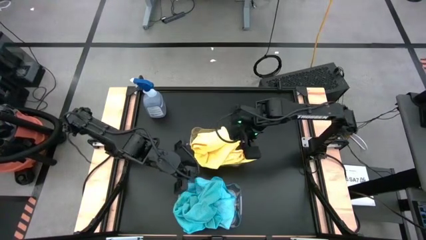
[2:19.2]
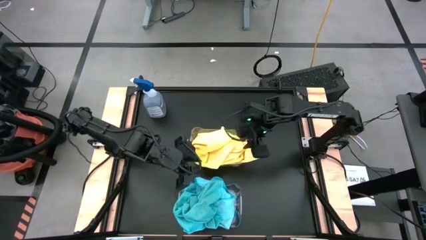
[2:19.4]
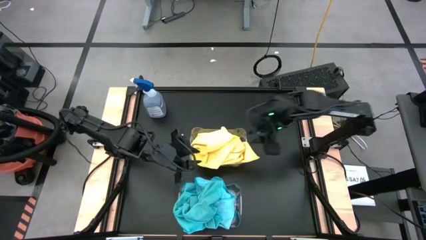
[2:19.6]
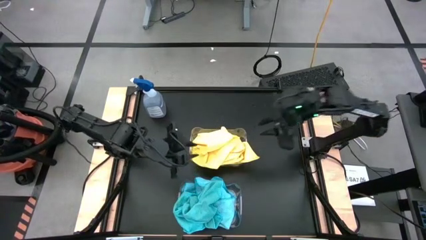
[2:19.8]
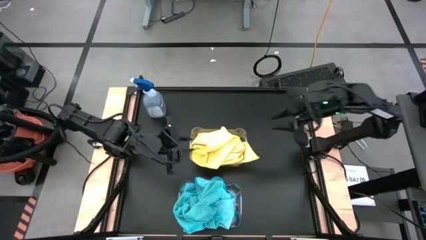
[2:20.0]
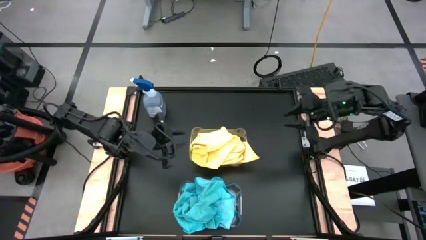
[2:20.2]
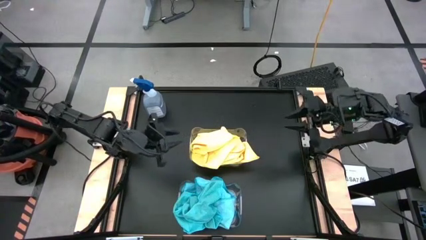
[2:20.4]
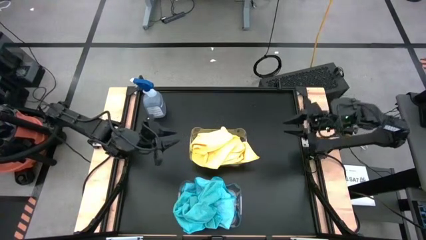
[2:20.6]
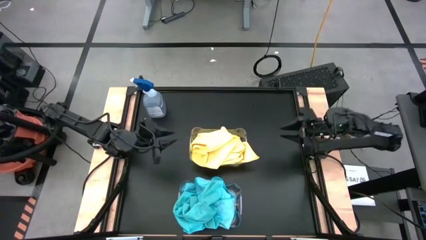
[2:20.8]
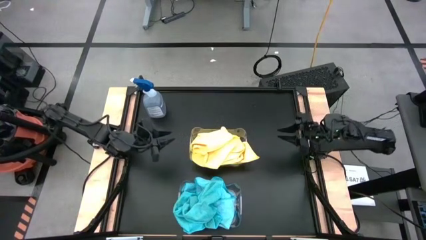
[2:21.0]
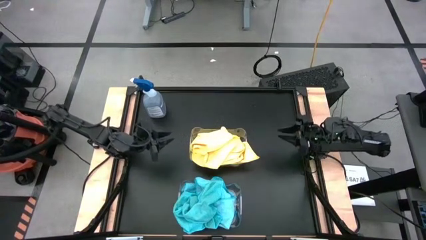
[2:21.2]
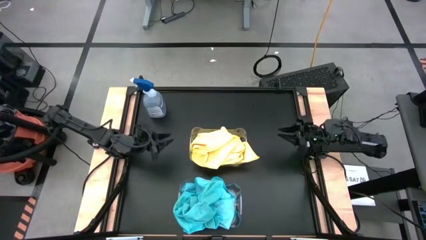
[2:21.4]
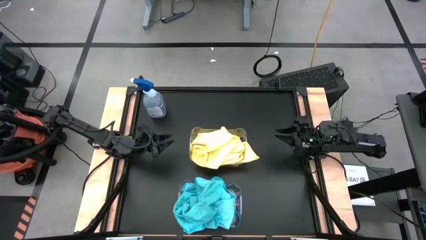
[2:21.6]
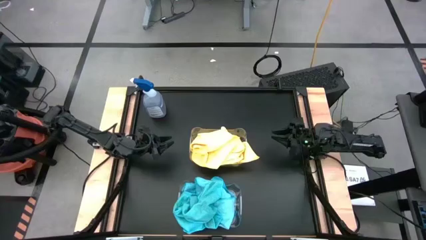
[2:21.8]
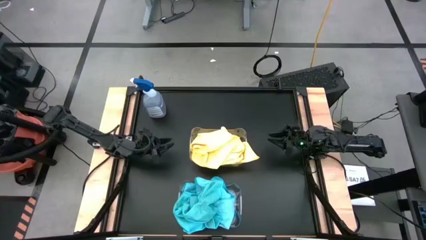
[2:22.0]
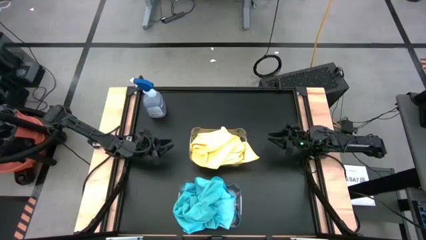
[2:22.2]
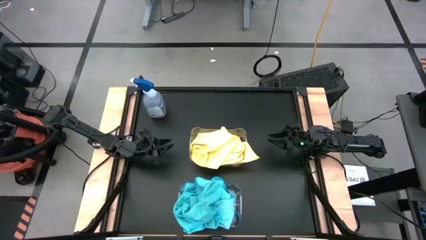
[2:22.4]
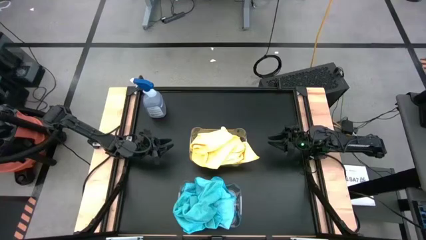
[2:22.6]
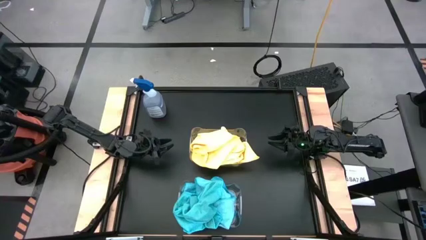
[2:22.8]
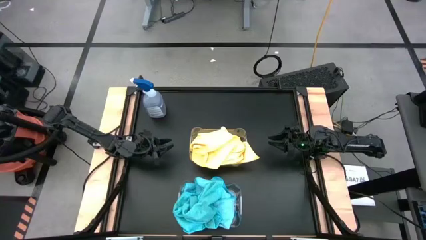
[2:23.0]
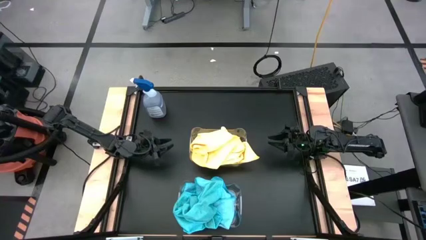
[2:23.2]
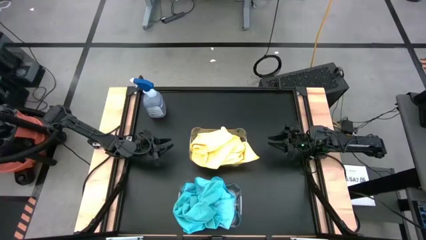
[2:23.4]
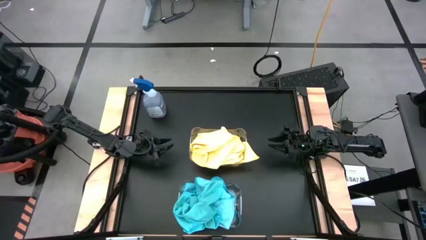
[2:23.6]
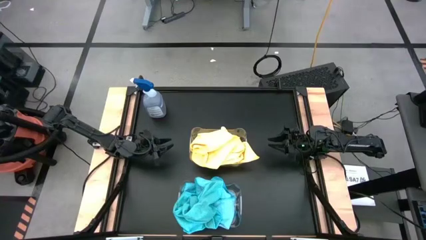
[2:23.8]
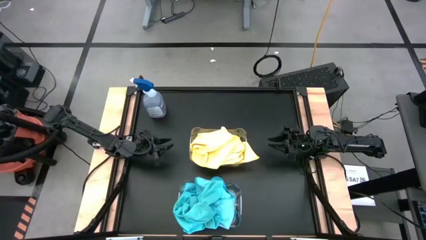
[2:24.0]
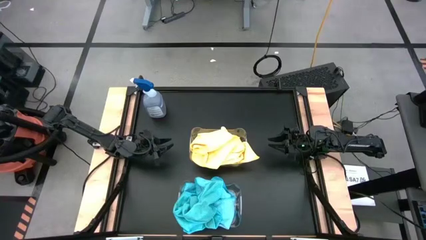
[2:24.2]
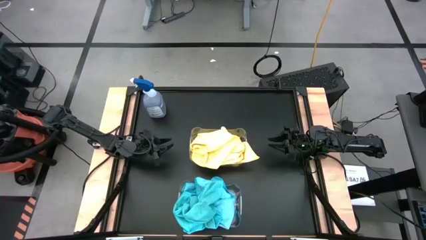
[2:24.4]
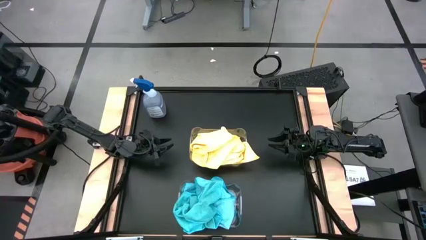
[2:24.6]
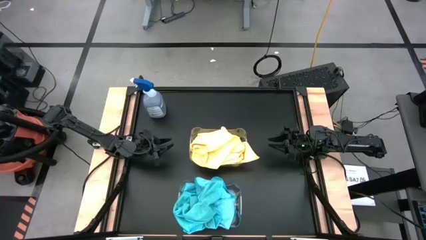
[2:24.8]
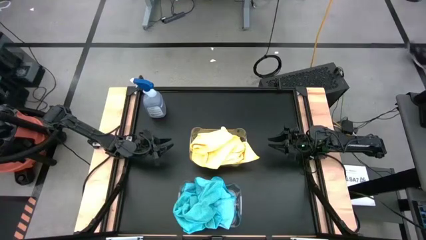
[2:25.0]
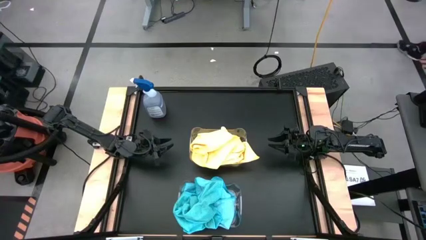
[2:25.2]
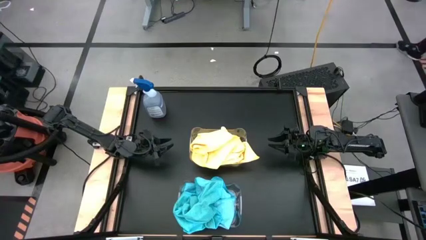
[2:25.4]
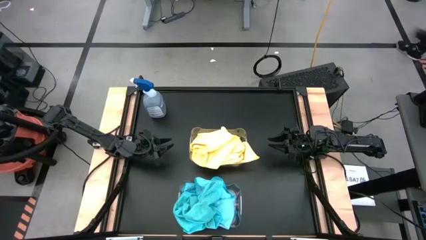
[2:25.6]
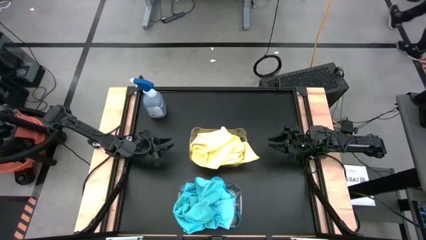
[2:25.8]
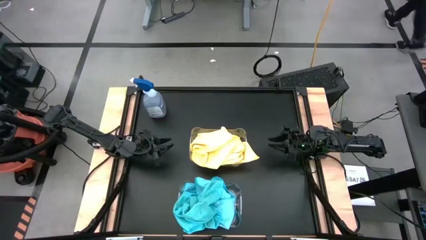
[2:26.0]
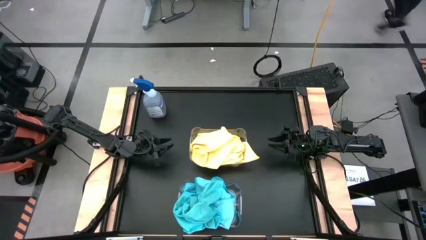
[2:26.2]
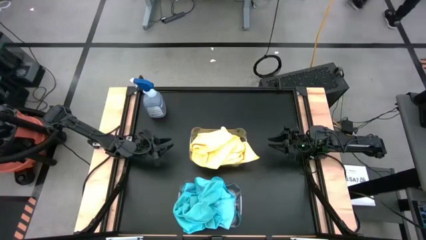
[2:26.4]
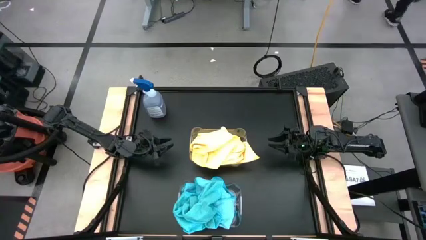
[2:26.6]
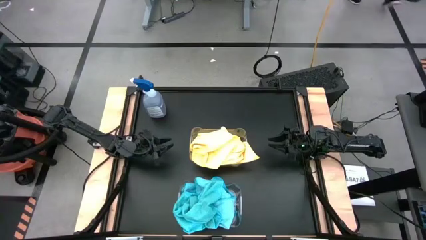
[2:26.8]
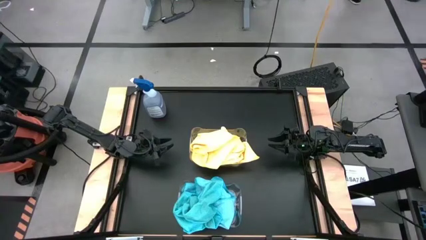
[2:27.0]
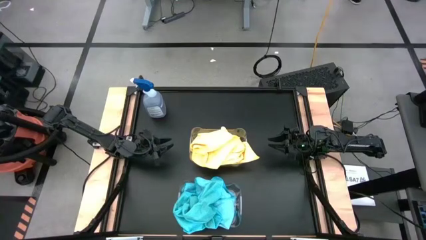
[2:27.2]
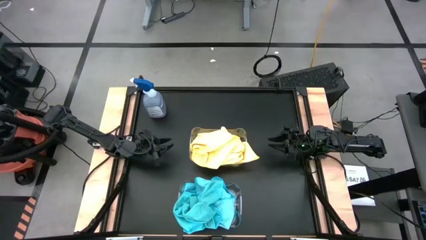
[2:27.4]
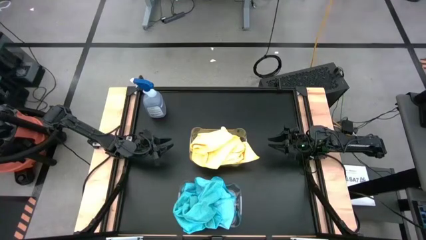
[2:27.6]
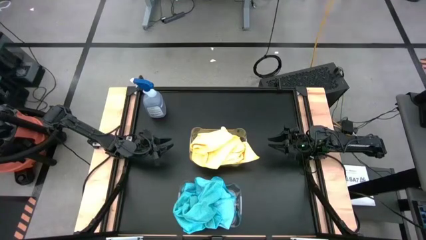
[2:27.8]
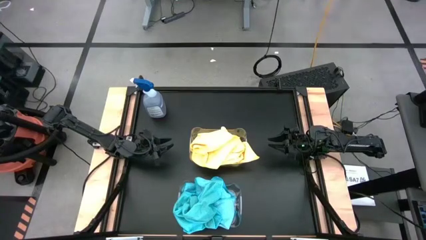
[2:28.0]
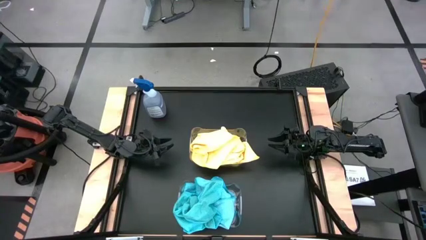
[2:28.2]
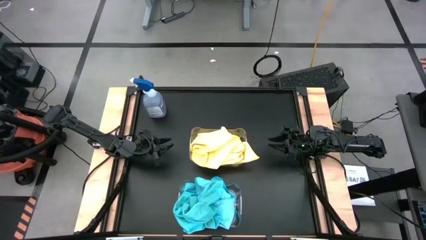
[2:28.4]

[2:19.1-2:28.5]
Task: Sort microfiber towel by color & place in baskets
Return to Home Position

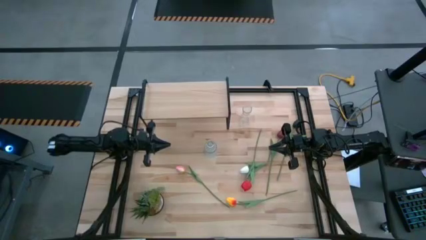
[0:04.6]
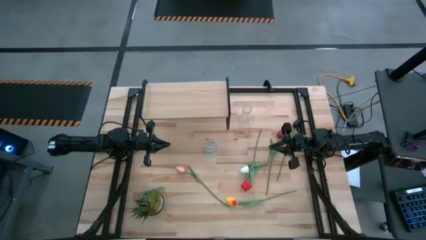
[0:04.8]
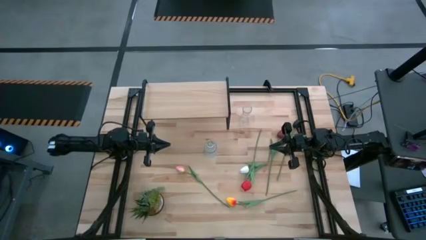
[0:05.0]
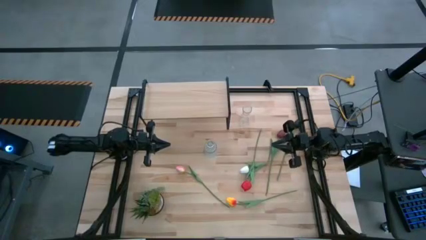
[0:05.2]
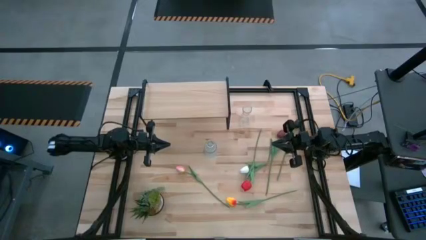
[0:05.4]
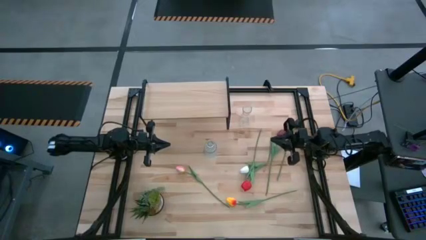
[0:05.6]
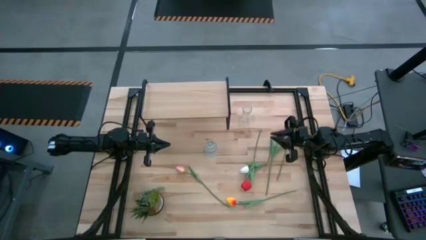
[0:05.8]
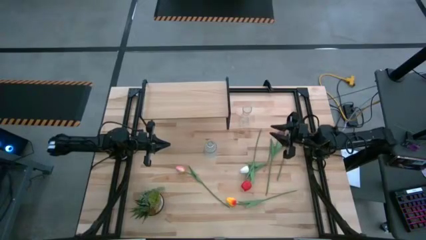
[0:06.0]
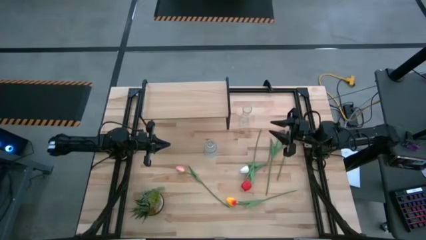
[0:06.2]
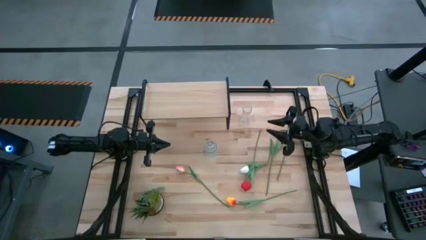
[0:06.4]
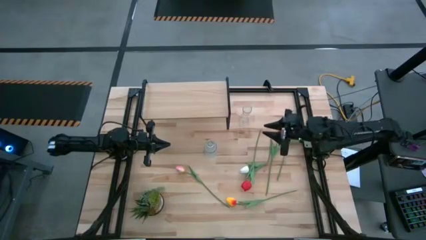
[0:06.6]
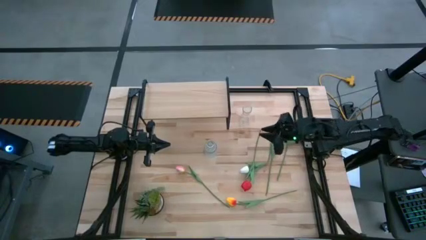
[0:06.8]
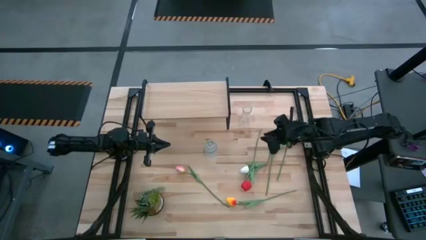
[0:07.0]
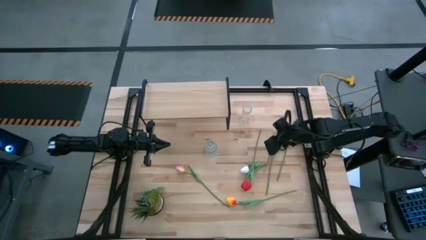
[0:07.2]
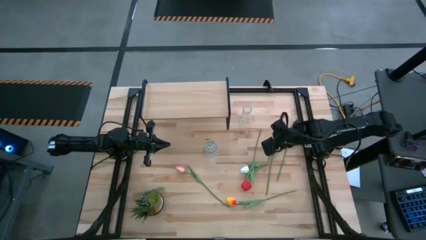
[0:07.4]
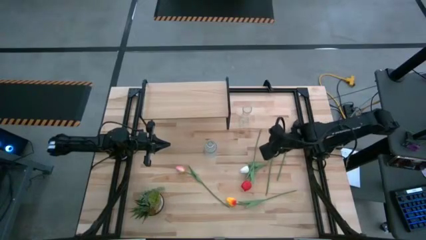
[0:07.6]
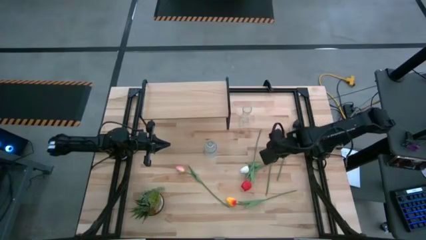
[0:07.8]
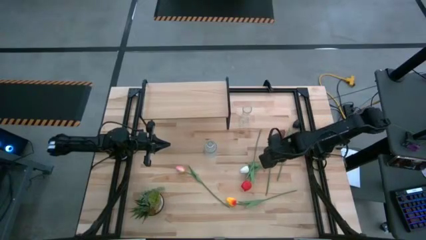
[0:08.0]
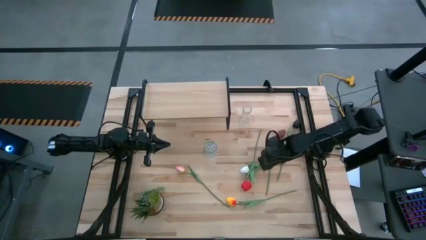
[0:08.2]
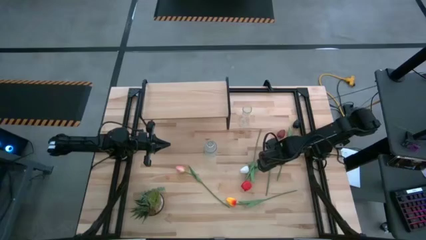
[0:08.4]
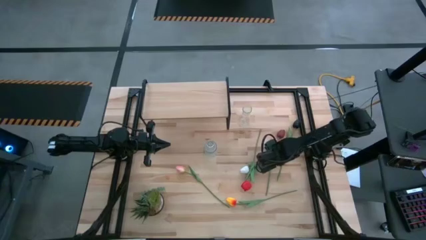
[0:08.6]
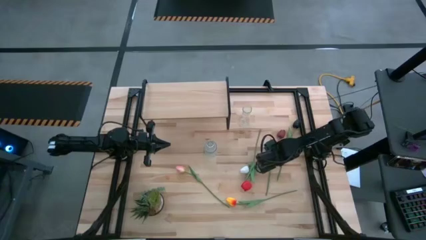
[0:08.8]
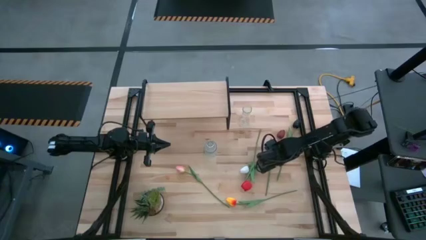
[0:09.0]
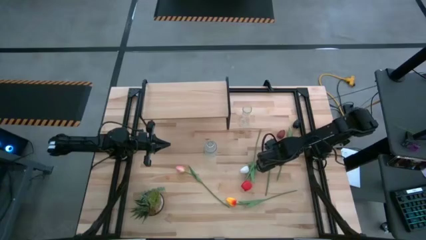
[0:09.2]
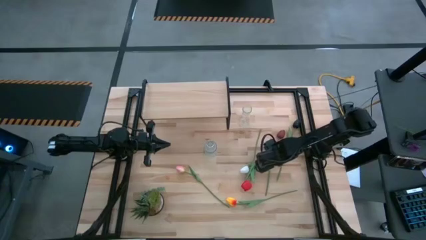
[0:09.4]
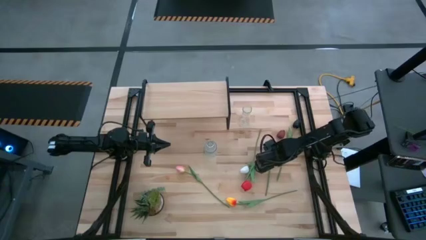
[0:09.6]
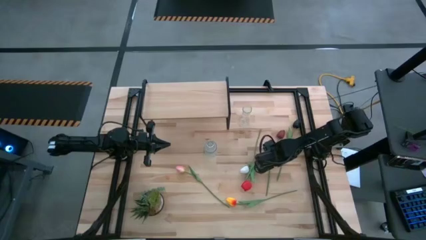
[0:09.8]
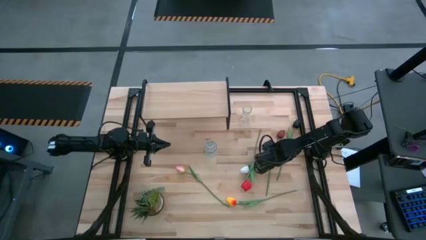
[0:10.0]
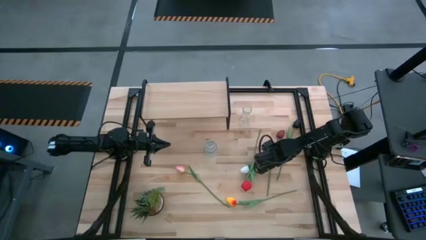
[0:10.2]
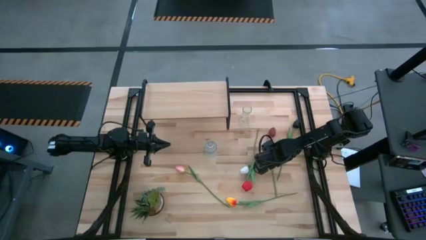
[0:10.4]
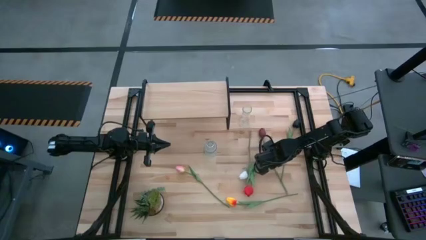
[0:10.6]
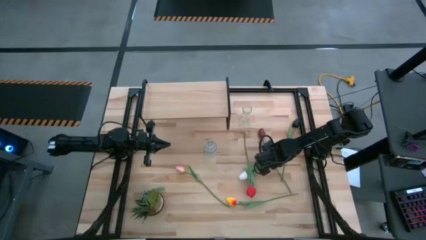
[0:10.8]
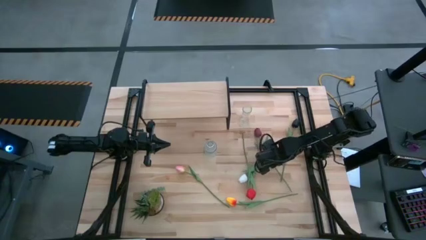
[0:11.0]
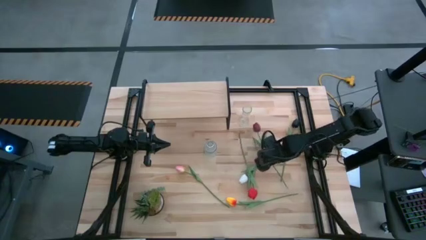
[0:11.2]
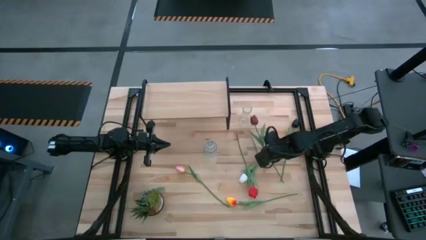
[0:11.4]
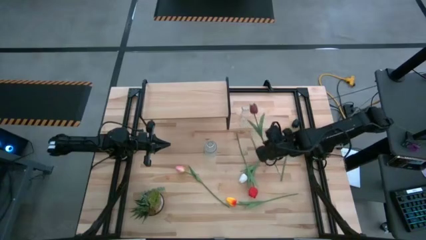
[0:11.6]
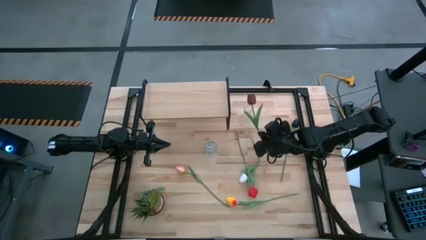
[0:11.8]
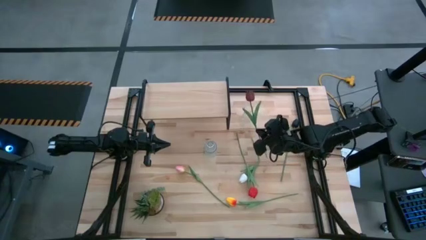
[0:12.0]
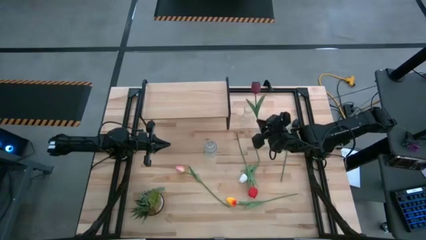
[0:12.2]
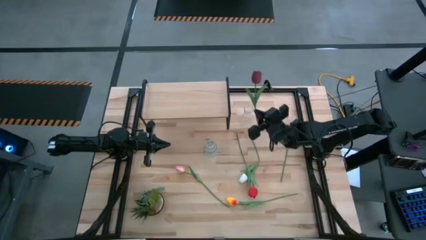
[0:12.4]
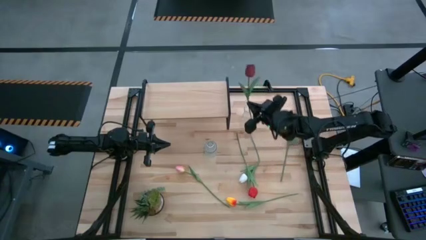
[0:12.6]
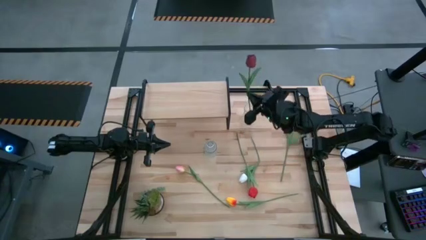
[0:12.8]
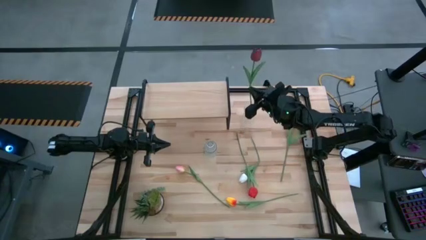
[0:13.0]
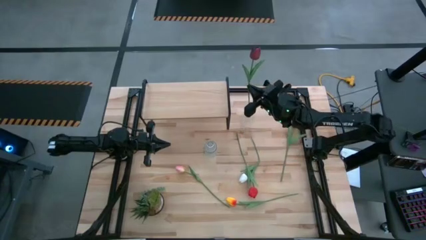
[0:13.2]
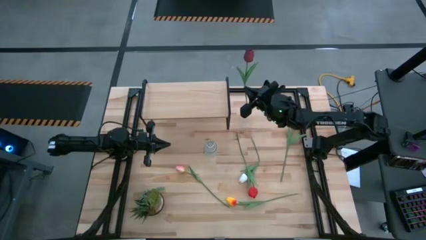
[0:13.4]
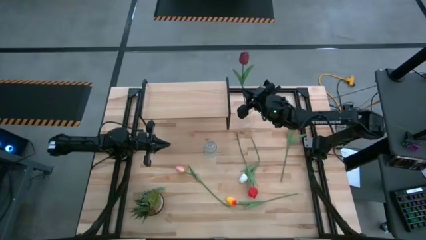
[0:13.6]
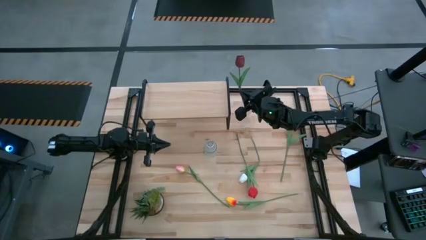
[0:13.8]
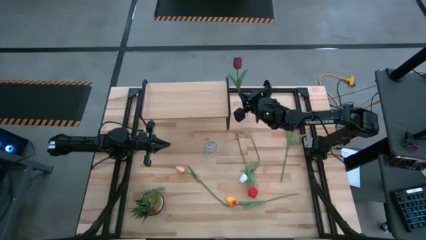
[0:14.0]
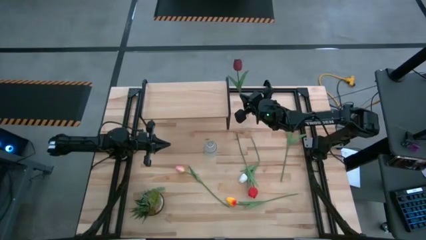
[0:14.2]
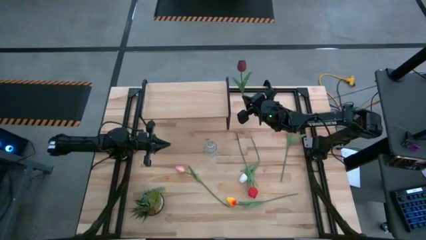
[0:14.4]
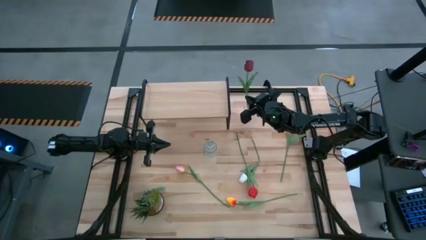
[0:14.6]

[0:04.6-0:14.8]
Task: Pick and place flowers into a vace then onto a shelf
Put the dark red tulip into the top transparent vase
